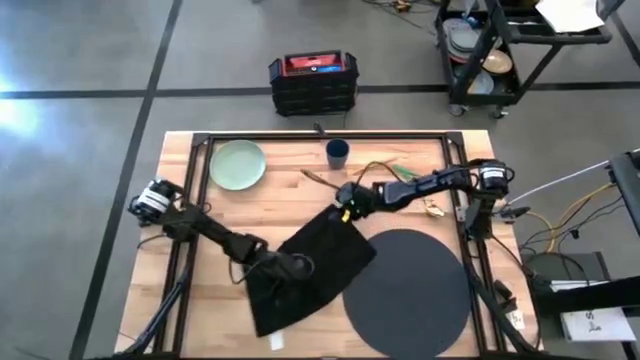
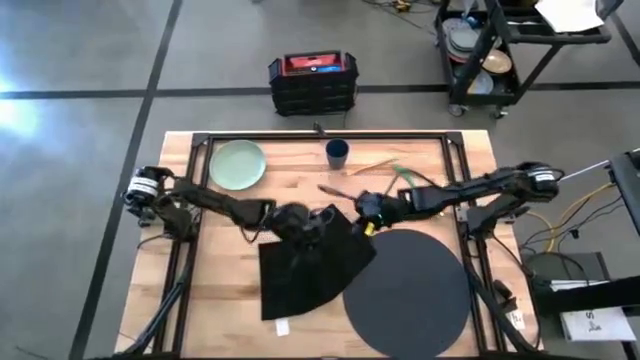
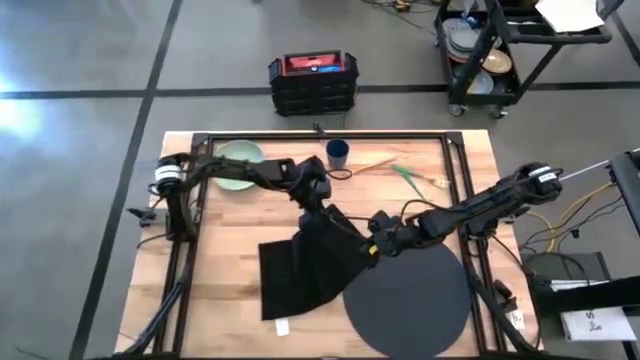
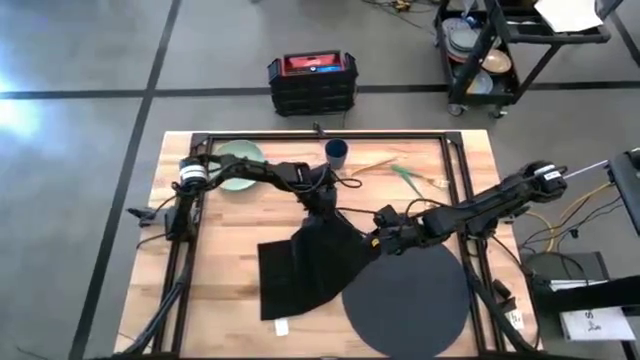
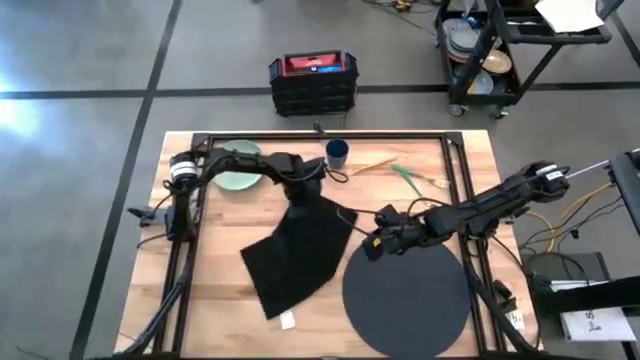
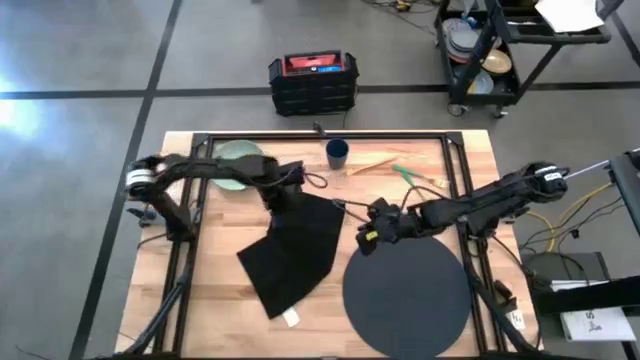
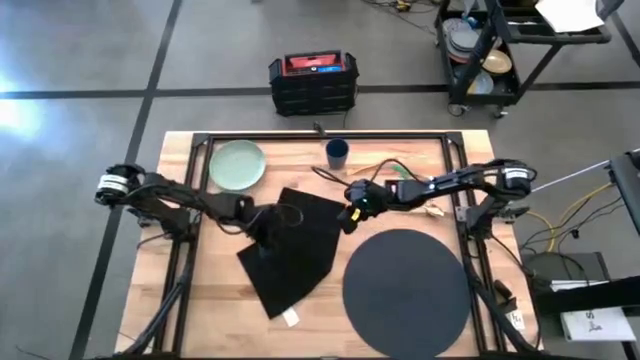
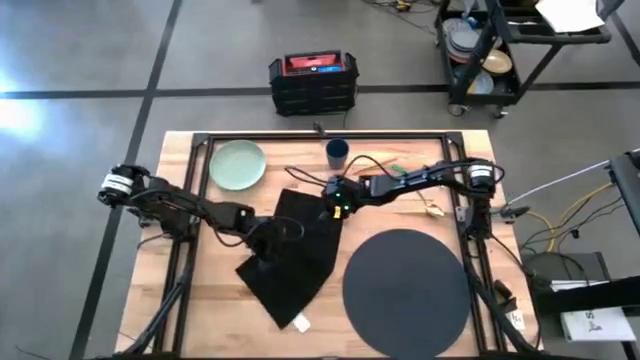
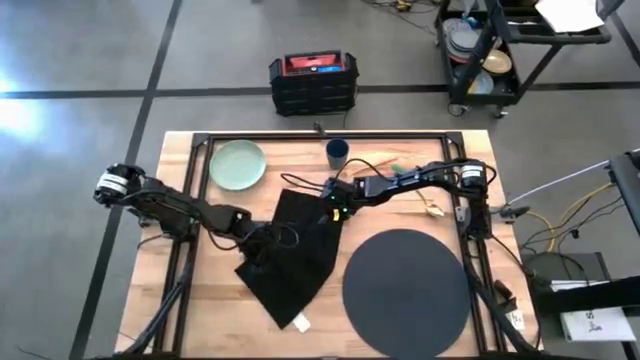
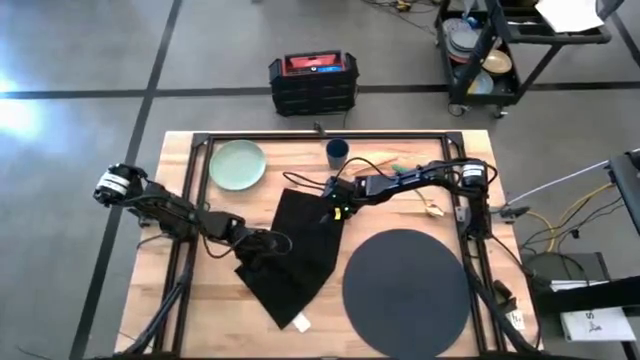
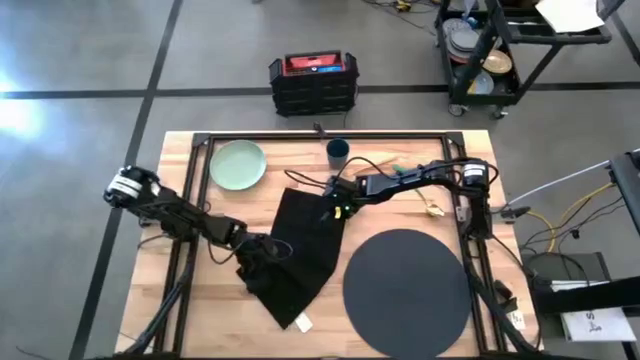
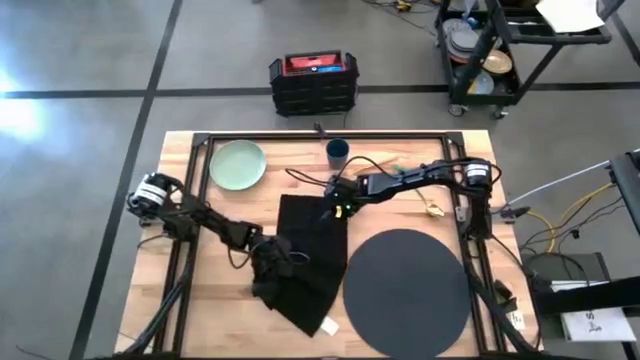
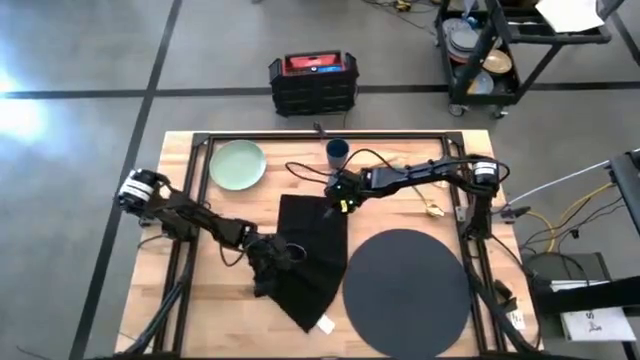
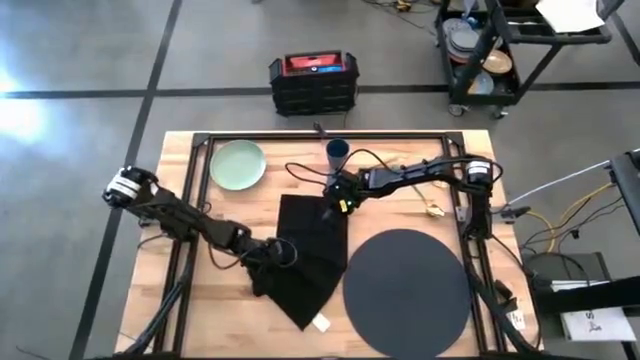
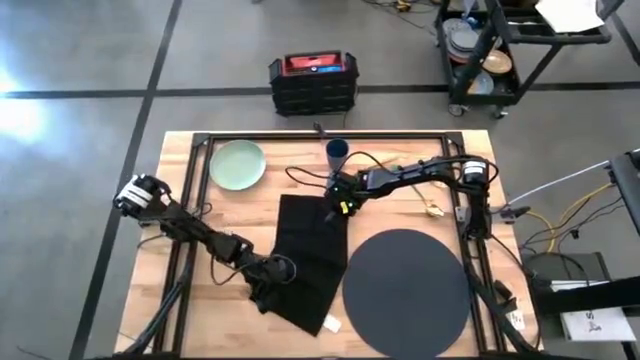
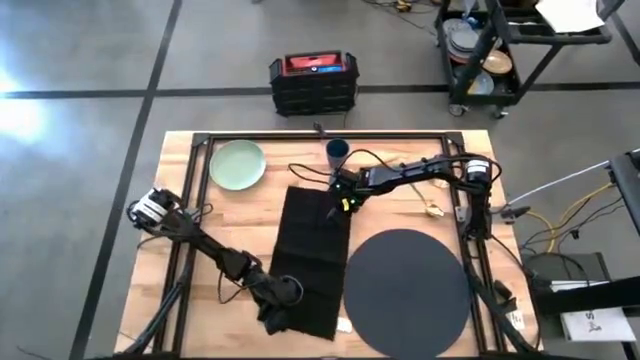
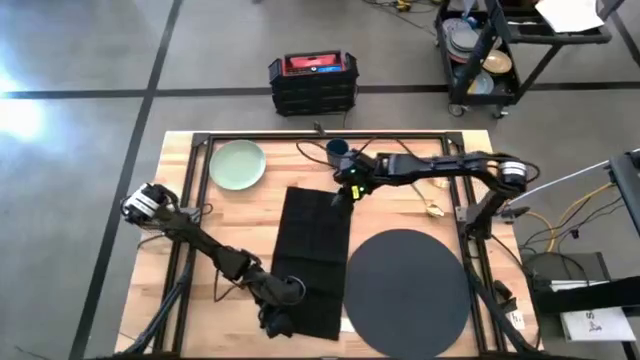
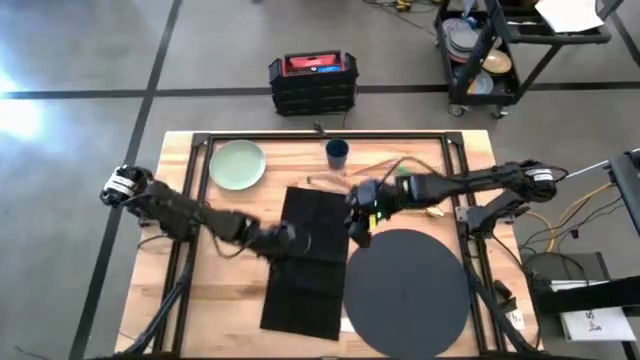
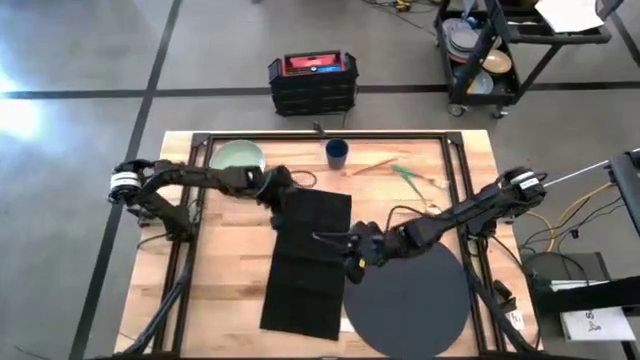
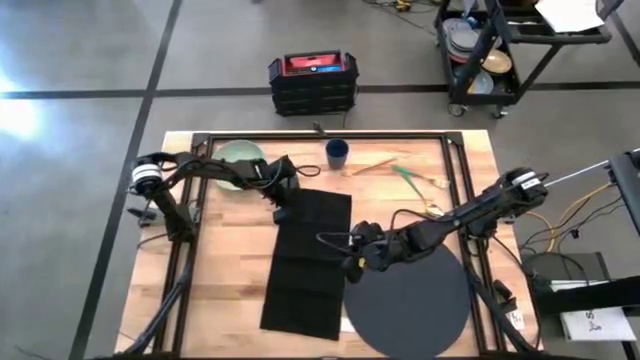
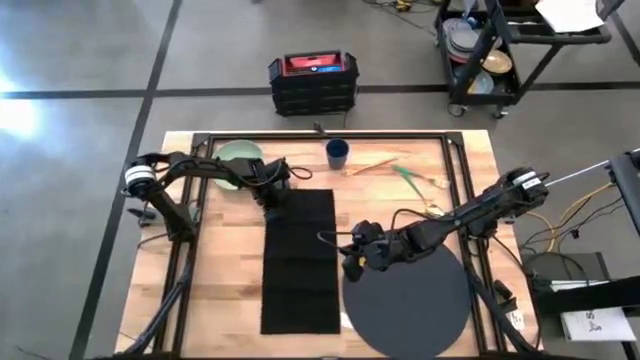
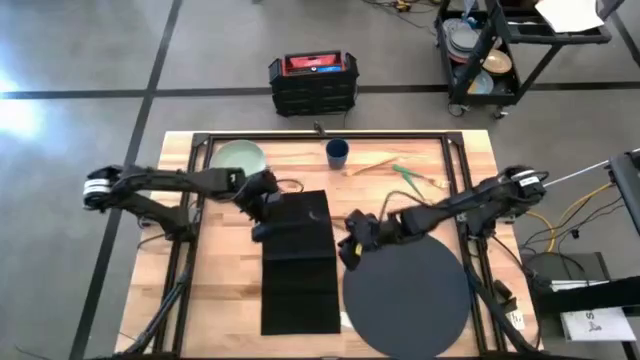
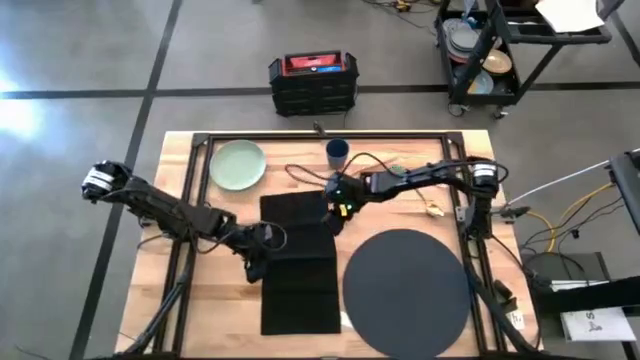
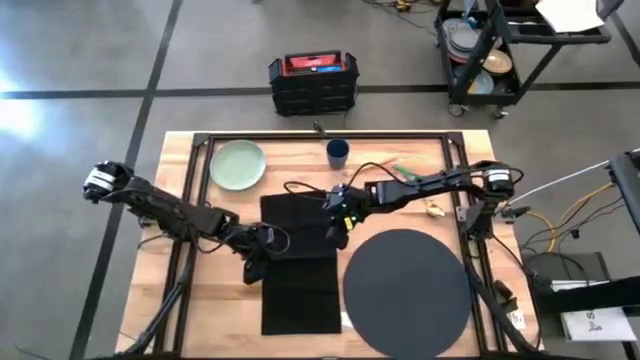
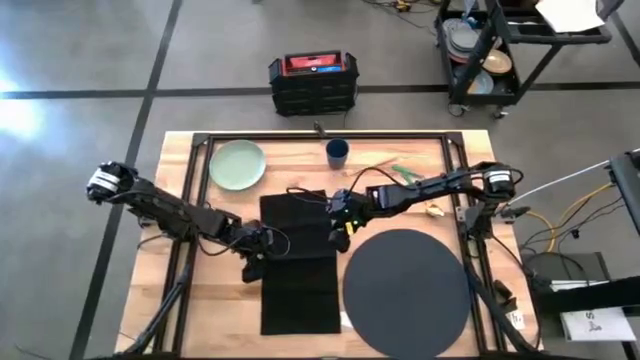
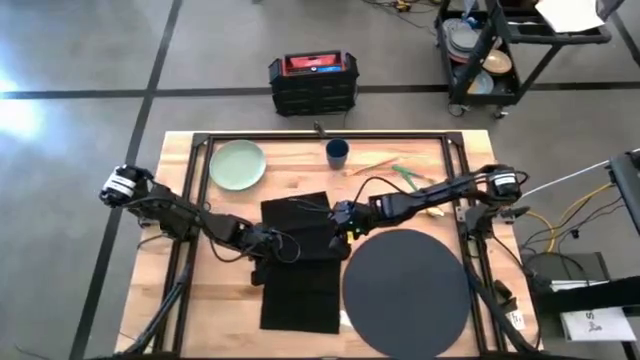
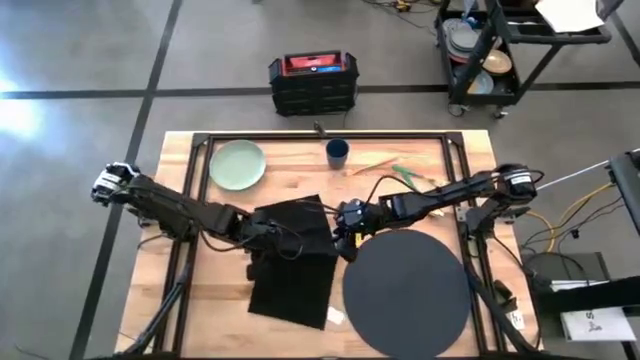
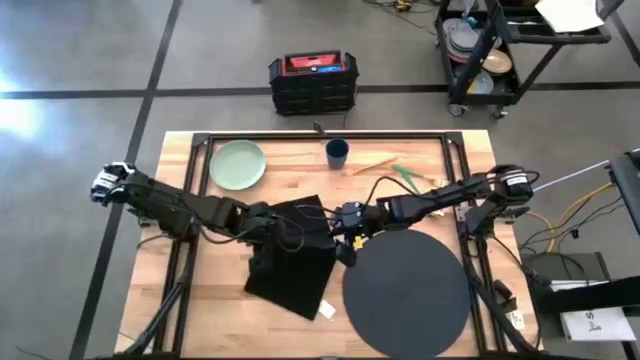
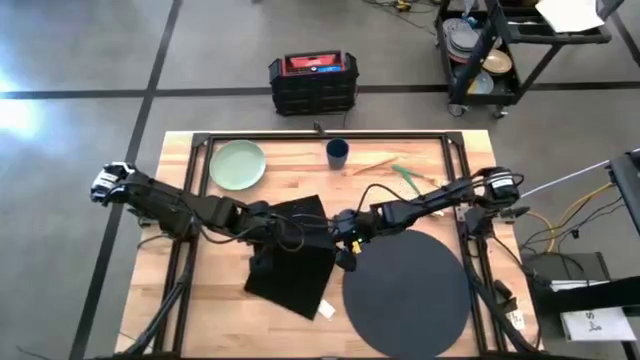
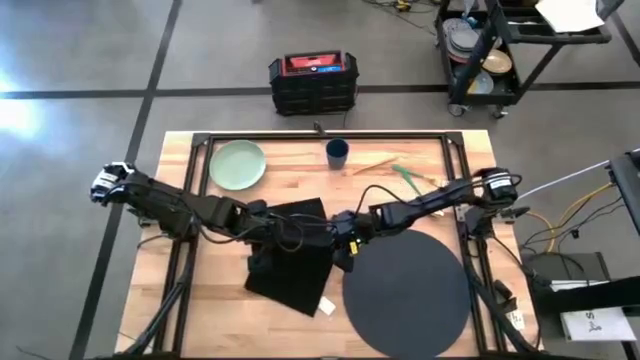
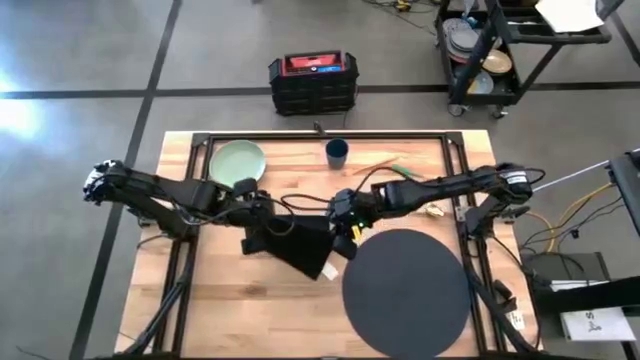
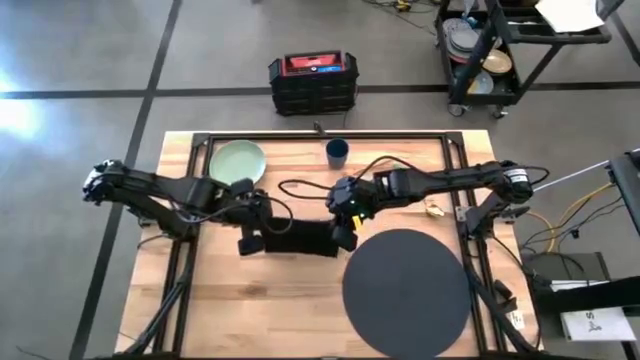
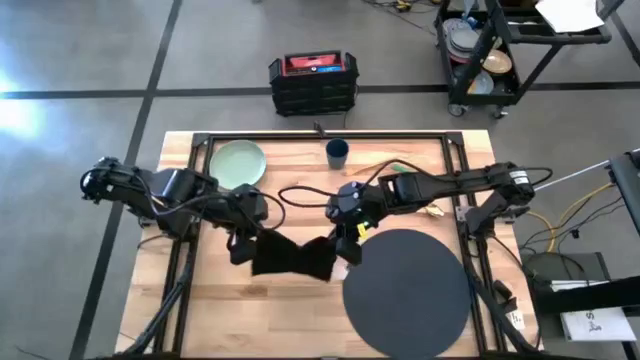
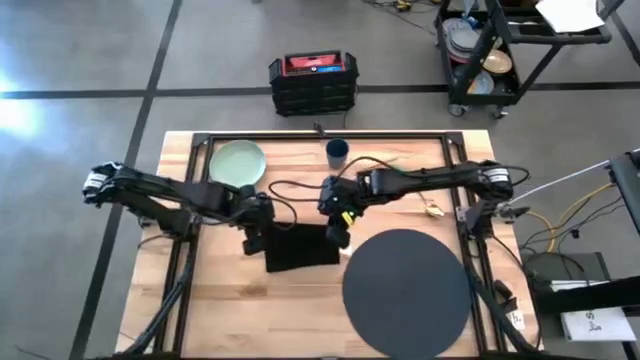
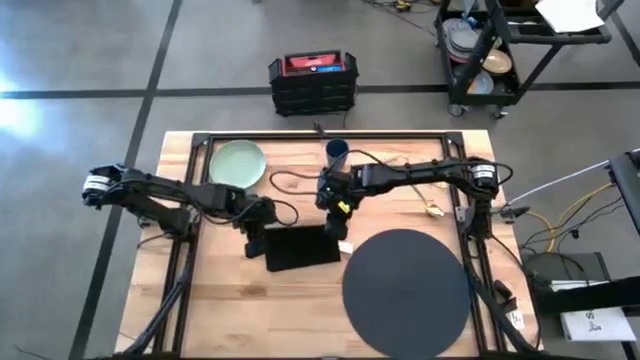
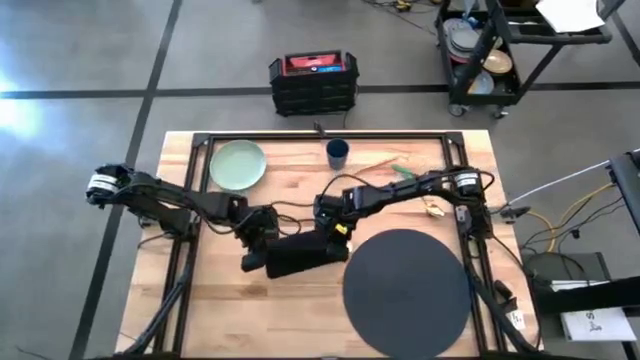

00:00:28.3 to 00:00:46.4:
Task: Set table place
Fold the black table napkin
